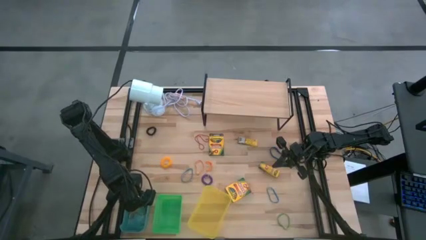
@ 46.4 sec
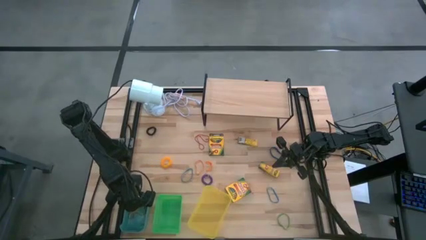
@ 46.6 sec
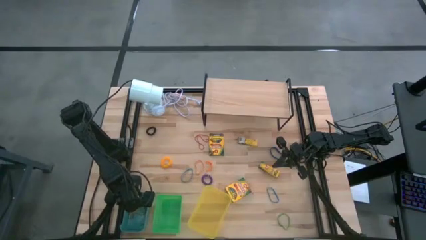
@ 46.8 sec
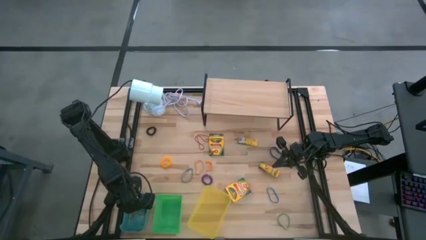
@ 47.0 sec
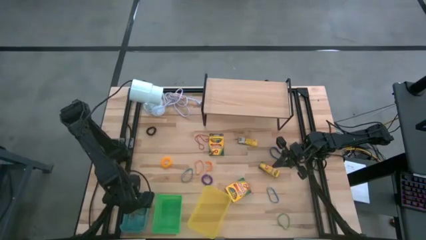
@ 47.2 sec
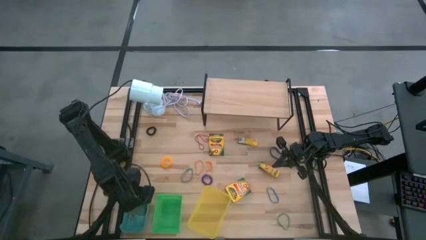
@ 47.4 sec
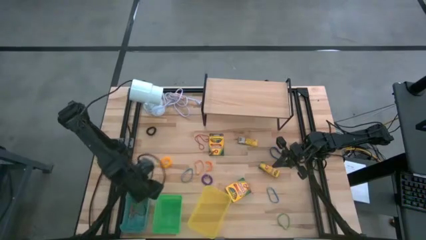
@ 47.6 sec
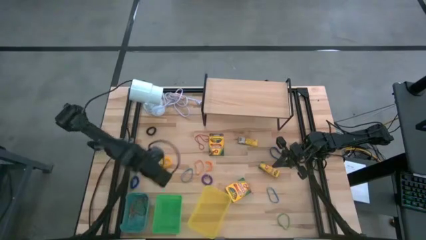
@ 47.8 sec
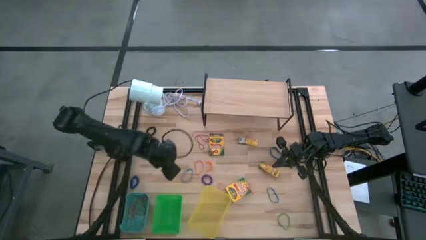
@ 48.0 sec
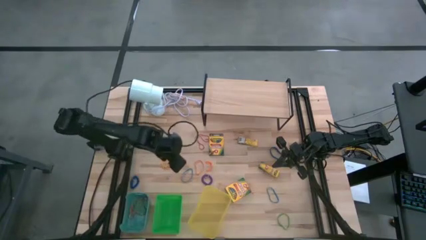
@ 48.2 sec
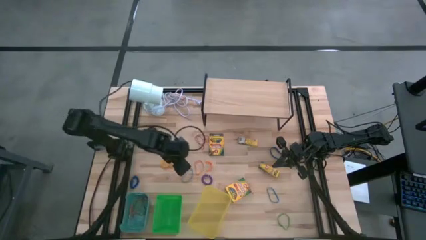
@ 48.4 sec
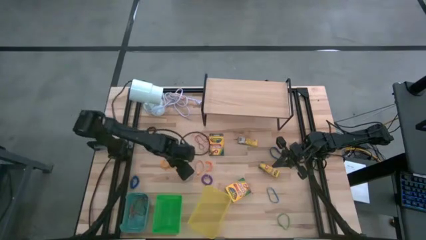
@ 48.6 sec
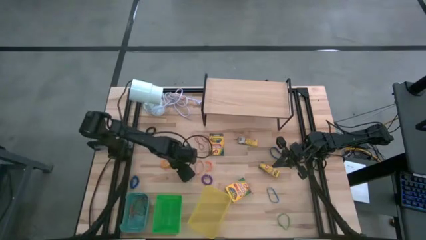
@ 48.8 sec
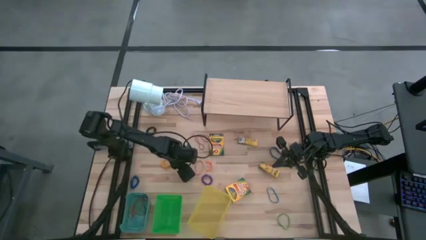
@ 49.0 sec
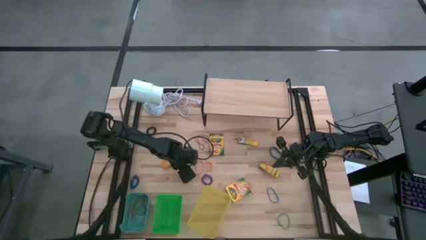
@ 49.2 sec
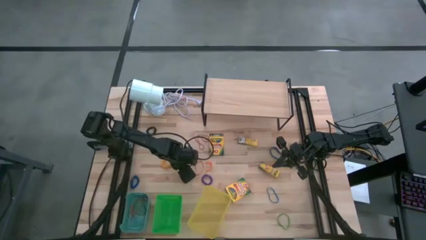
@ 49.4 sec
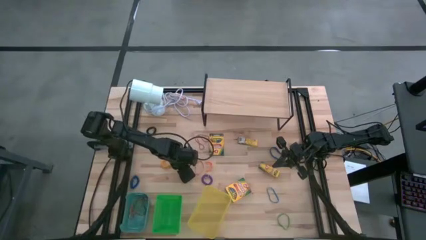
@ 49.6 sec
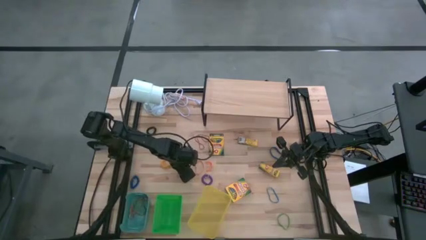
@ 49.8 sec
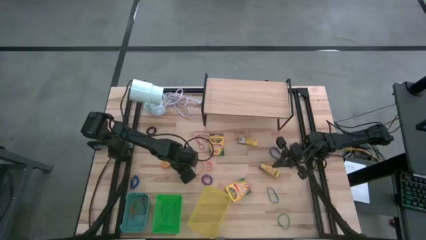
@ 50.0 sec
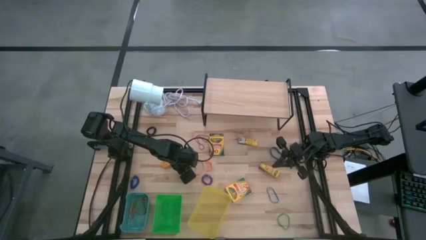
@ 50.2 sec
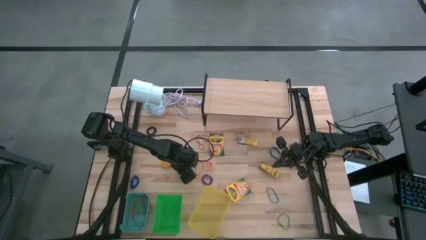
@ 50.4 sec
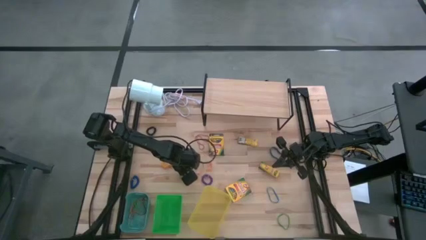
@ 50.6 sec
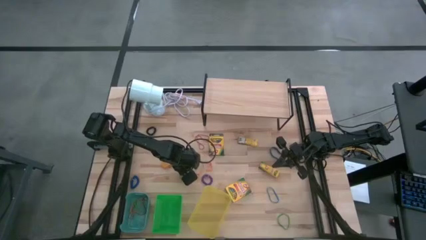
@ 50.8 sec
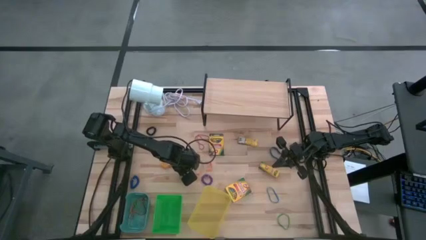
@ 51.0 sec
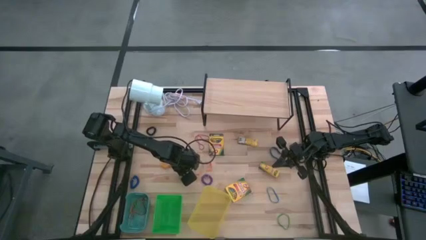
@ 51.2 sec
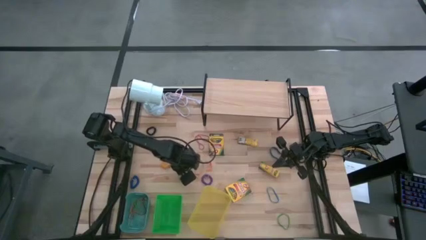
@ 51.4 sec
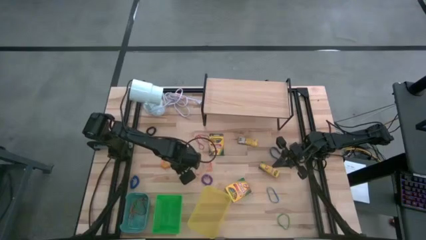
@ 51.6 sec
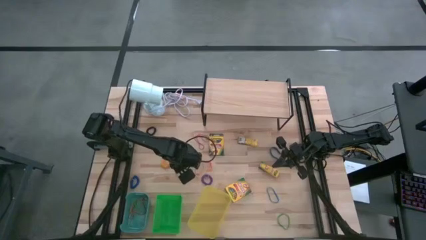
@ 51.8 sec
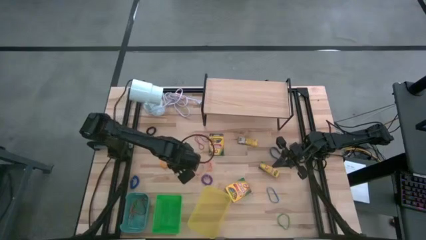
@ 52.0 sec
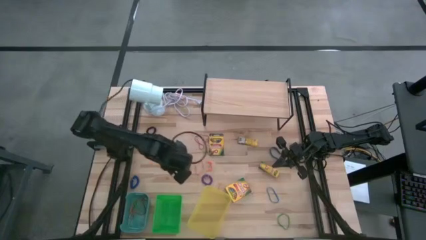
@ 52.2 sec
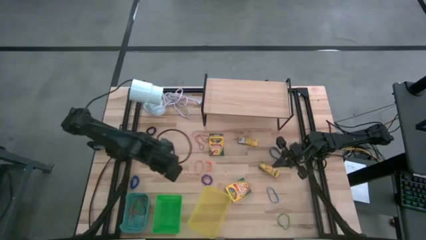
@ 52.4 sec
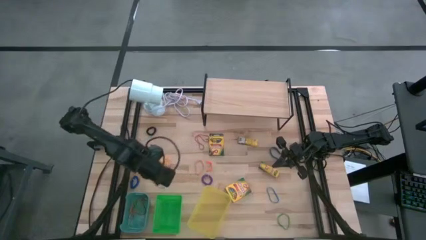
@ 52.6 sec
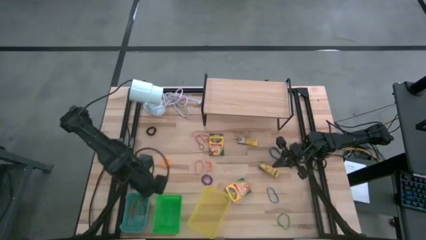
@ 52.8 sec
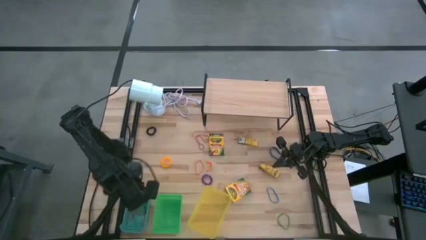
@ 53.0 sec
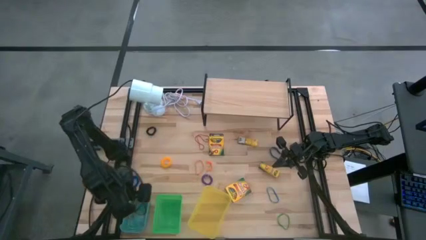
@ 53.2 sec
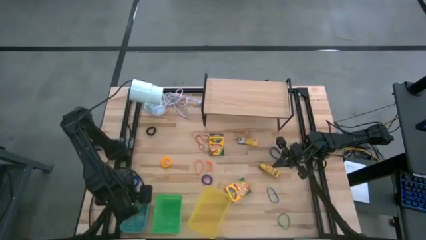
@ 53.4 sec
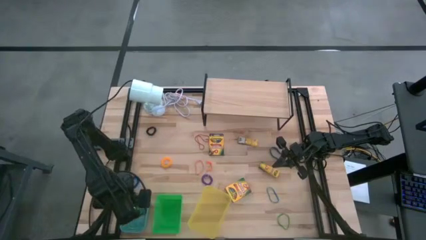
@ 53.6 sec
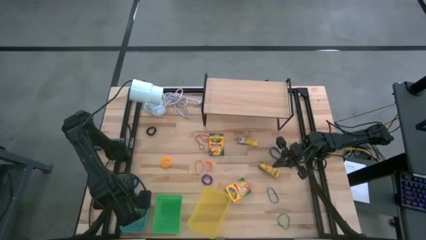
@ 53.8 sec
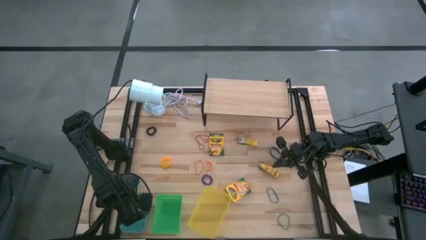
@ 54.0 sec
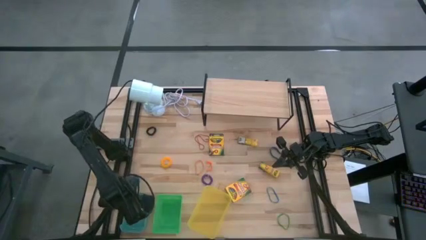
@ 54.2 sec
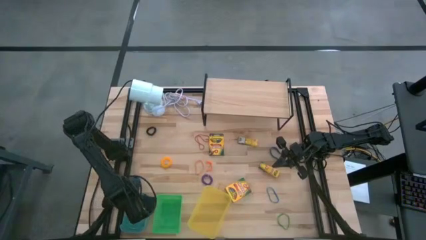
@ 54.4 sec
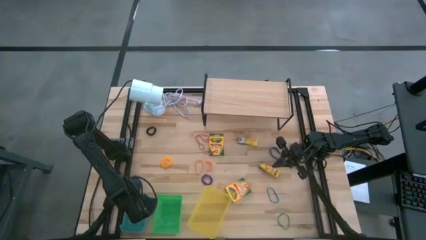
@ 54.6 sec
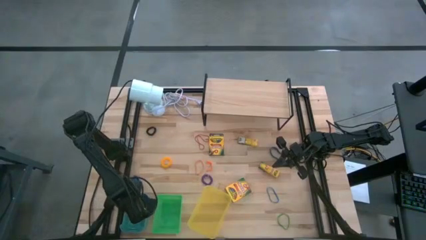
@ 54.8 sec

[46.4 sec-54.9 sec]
Task: Pick & Place Office Desk Supplies
Put the blue rubberband into the blue bin

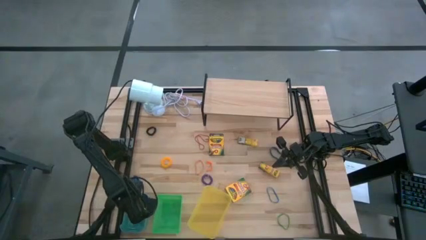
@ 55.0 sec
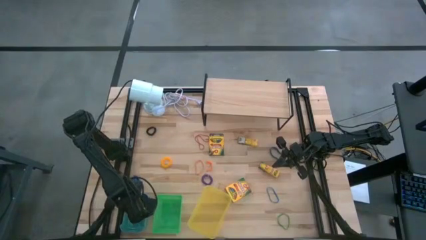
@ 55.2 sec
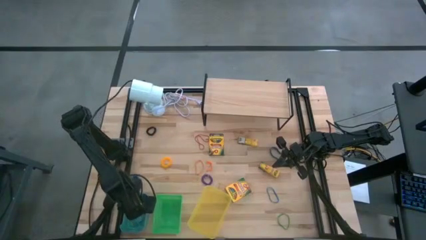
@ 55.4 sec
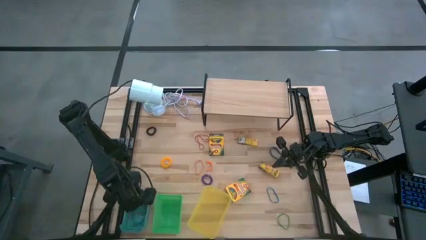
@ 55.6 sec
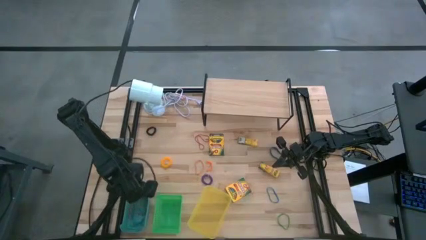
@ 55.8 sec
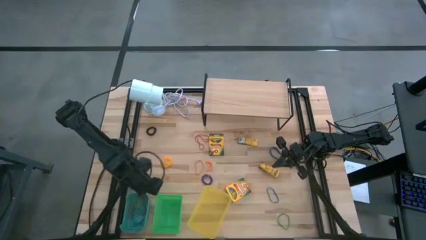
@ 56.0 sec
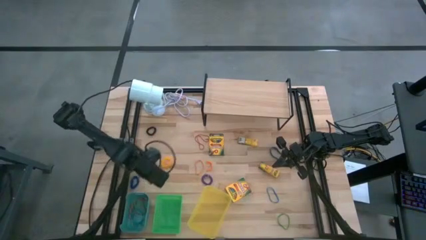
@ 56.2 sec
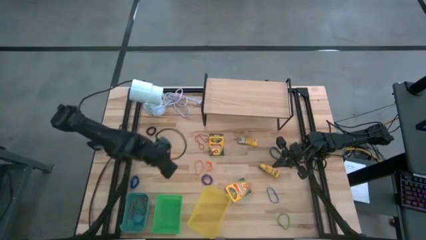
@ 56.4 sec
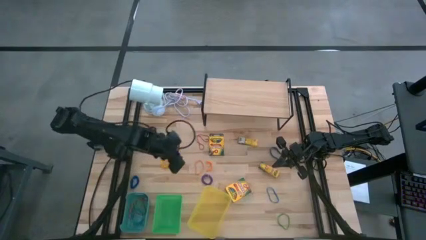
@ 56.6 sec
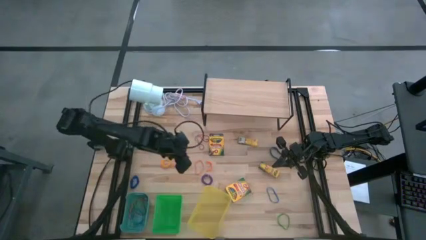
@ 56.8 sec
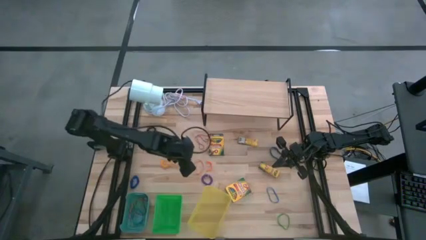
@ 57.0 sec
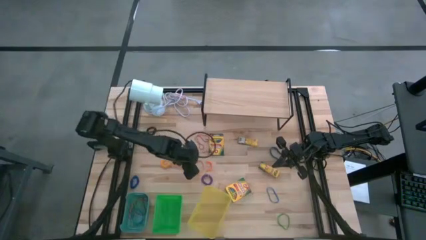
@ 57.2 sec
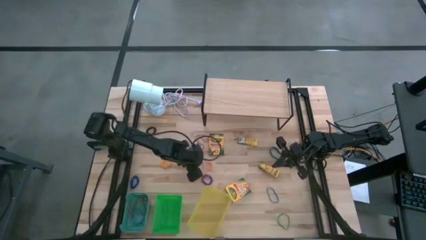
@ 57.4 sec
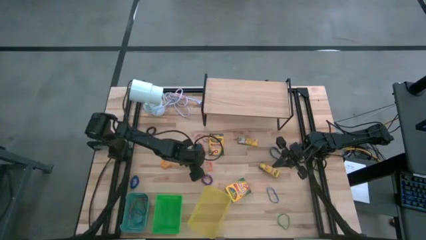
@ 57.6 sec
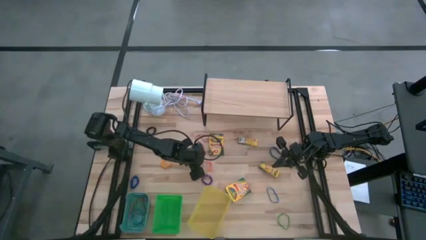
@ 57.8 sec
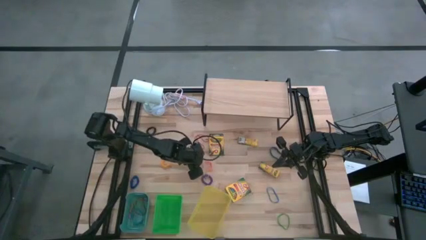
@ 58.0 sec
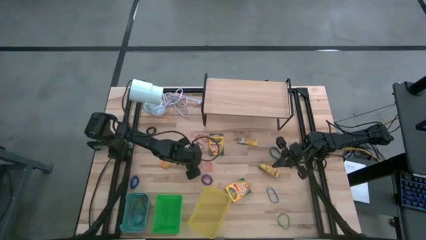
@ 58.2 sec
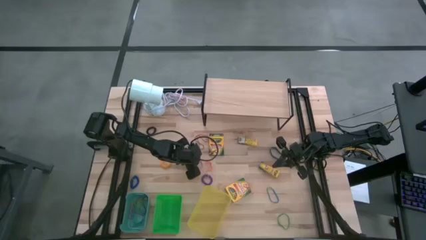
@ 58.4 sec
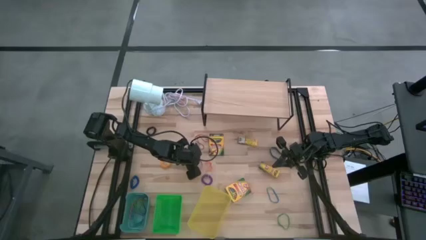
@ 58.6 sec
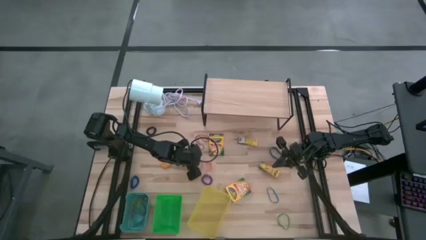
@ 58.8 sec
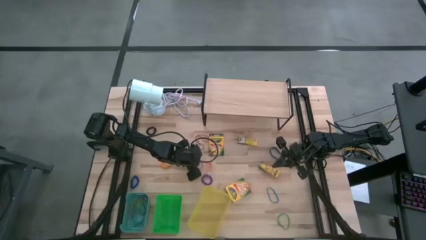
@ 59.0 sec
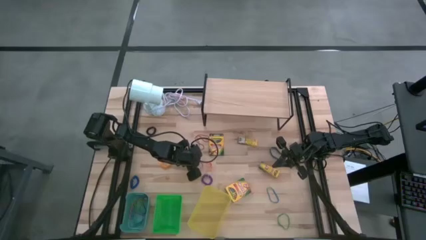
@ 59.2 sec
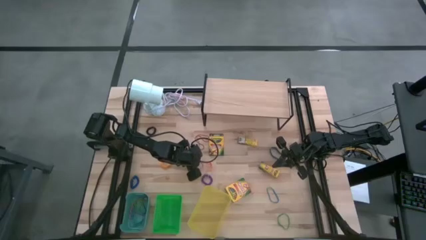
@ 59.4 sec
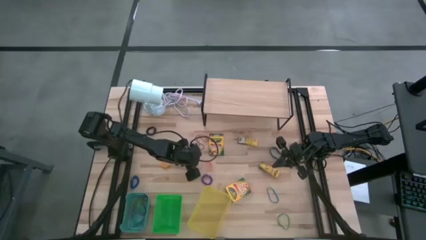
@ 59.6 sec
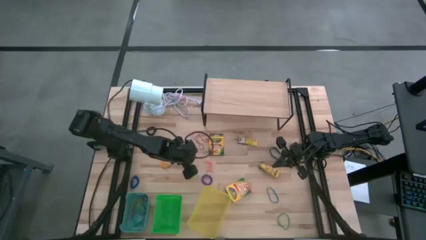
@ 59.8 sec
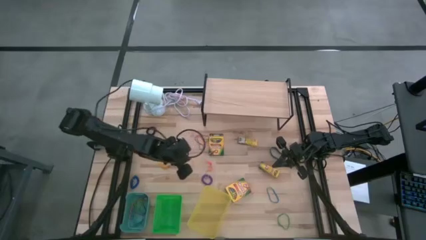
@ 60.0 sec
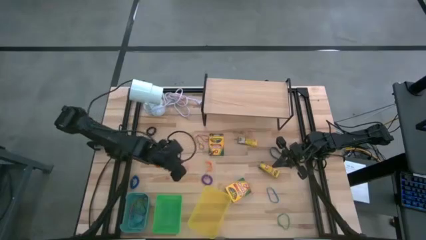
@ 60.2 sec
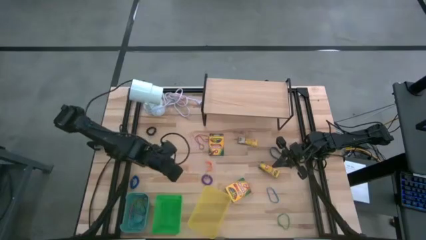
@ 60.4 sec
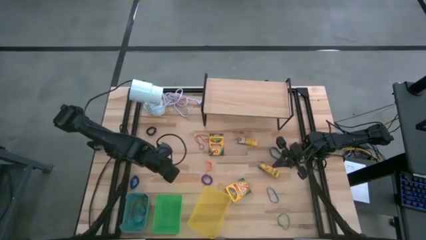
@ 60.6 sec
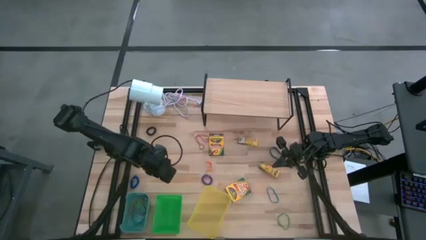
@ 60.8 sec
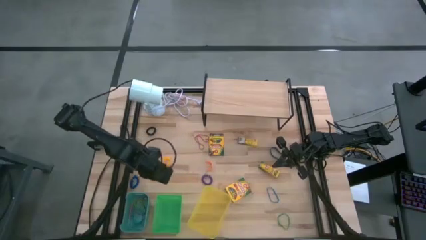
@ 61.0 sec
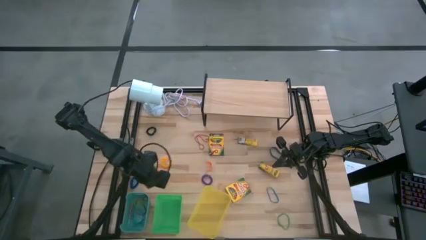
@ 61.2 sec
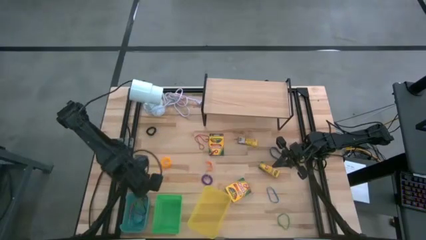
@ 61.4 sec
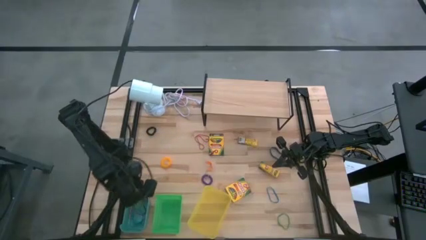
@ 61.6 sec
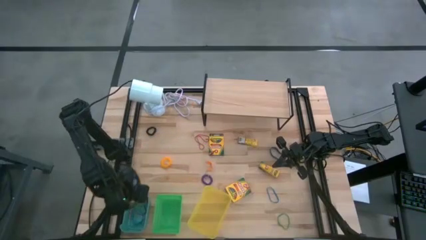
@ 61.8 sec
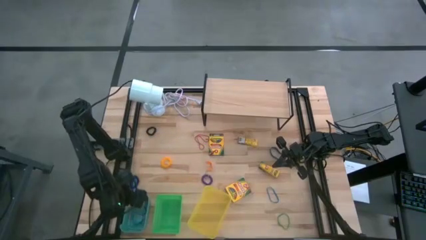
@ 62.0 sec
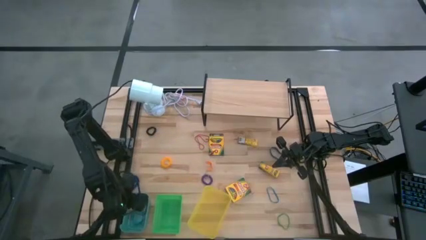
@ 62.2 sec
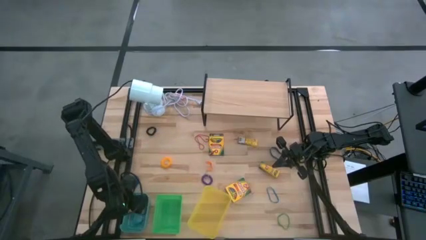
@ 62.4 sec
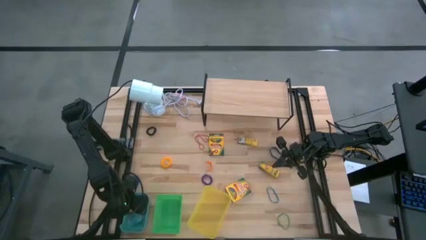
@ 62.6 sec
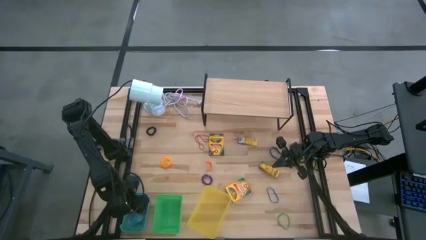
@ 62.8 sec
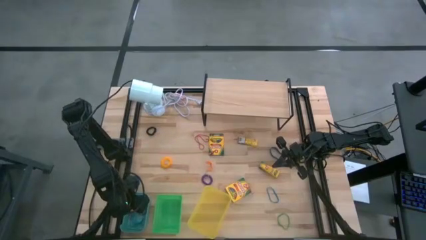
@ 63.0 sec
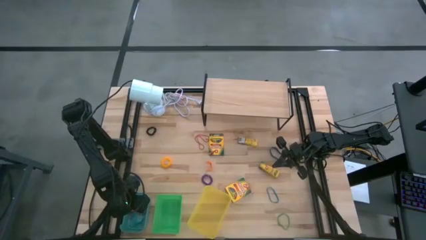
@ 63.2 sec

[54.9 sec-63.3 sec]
Put the orange rubberband into the blue bin
